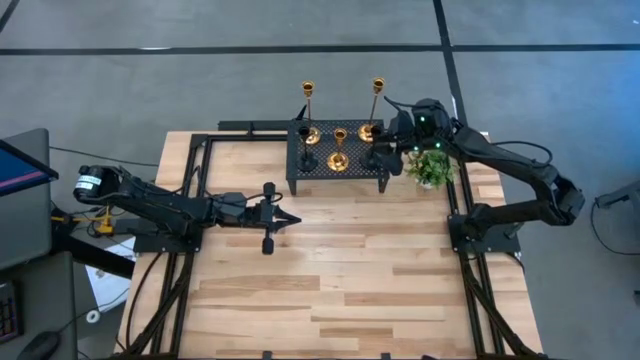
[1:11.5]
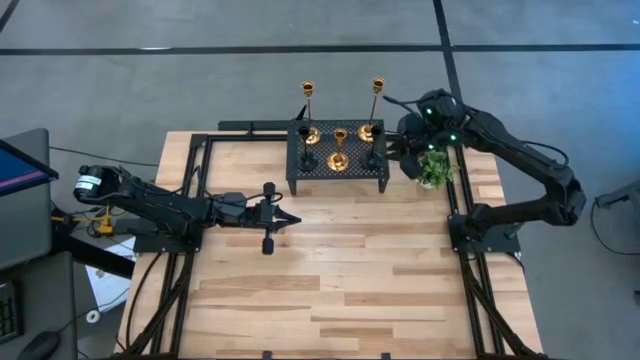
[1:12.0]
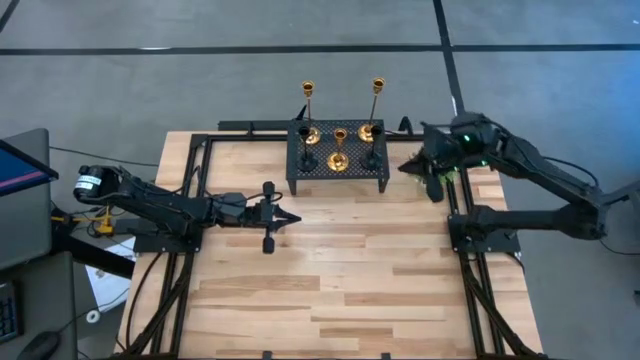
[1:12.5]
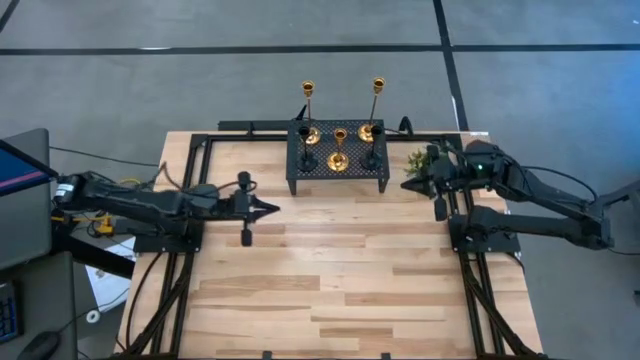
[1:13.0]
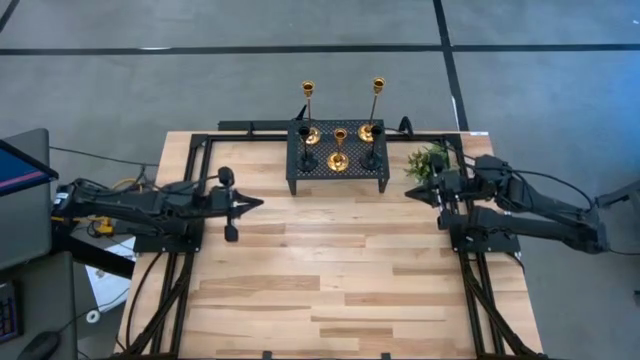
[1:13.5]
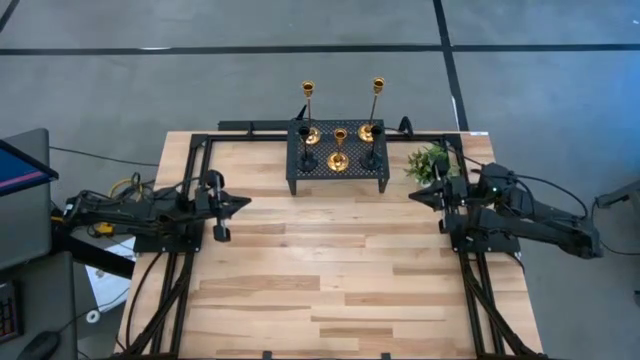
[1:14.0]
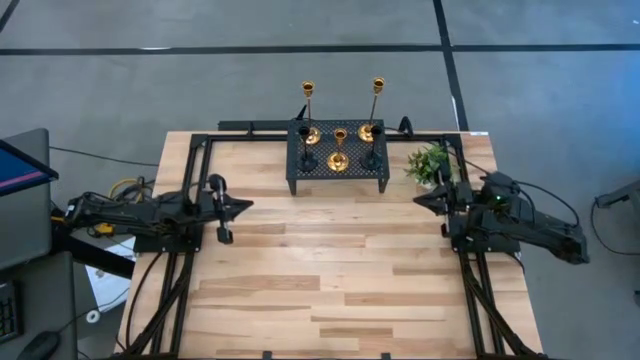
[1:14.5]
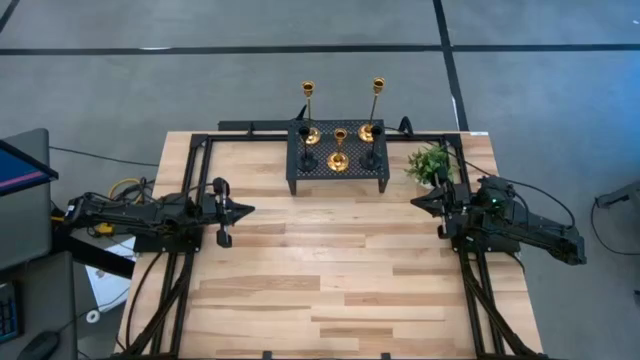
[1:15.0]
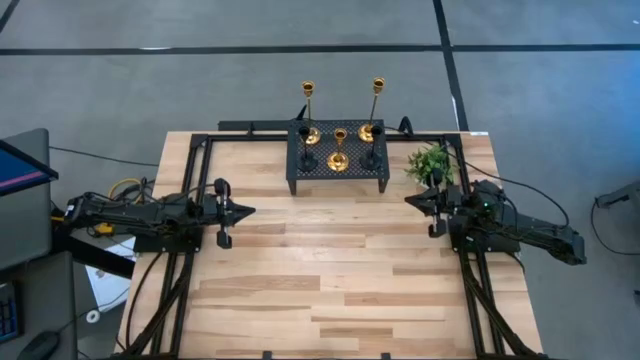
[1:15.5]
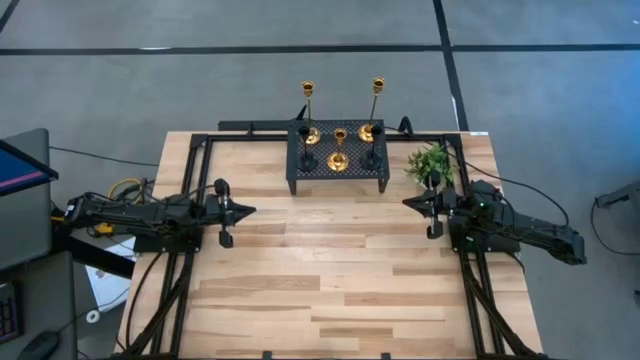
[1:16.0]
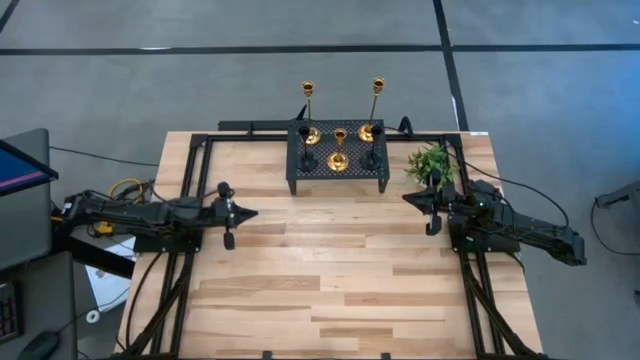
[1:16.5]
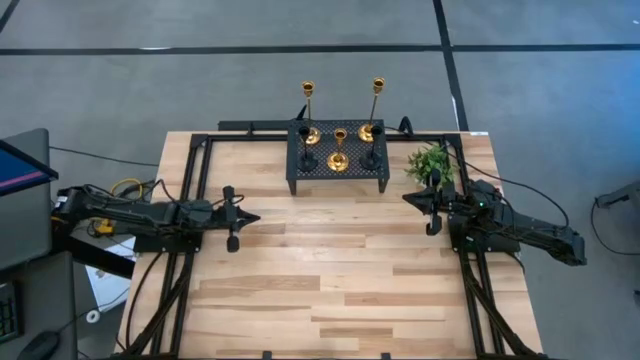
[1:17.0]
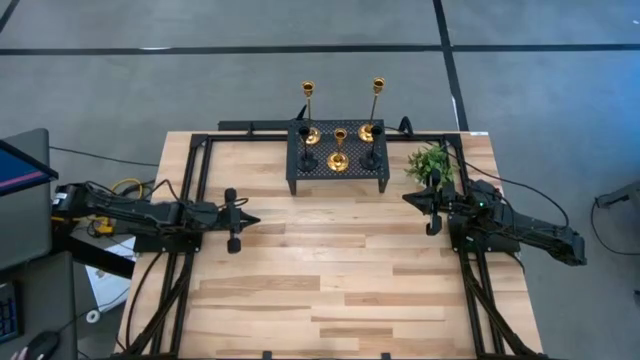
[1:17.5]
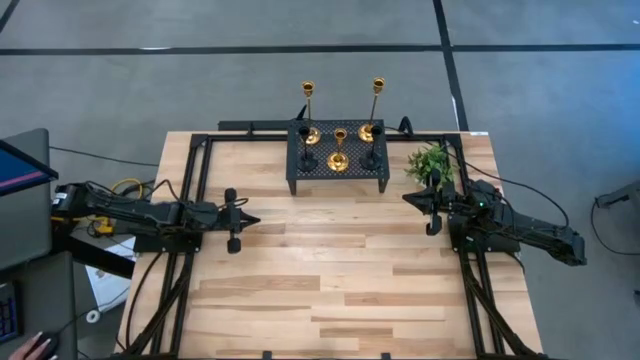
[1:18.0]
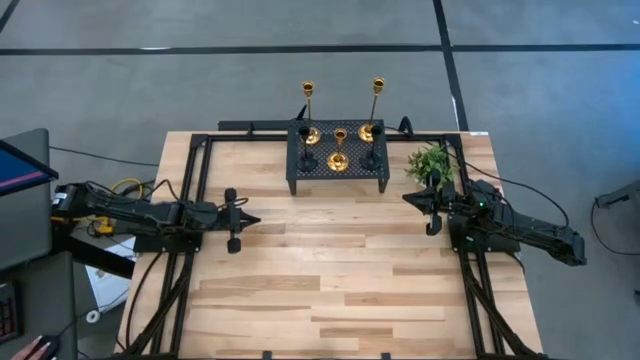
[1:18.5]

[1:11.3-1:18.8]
Task: Pick & Place candle stick holders
Return to Home Position

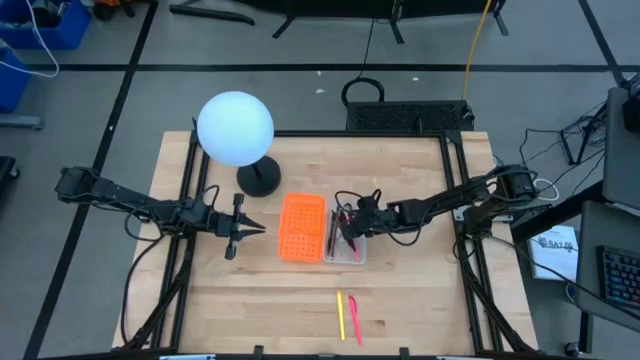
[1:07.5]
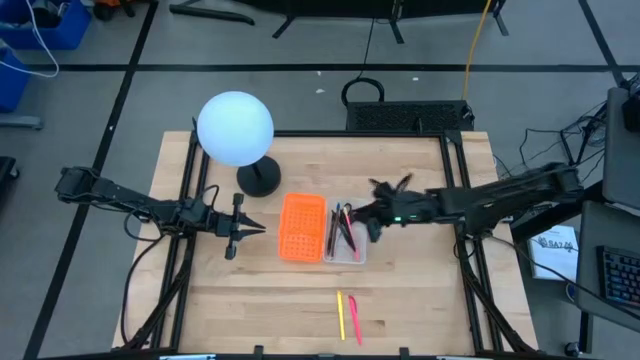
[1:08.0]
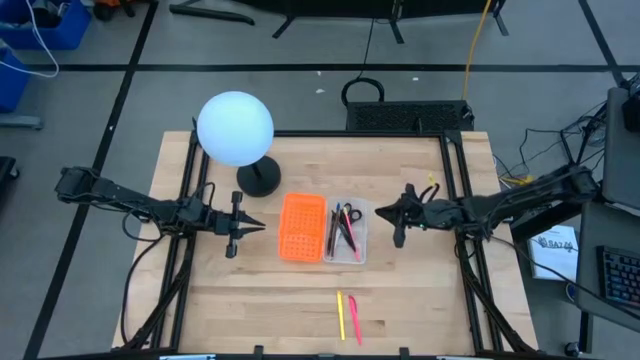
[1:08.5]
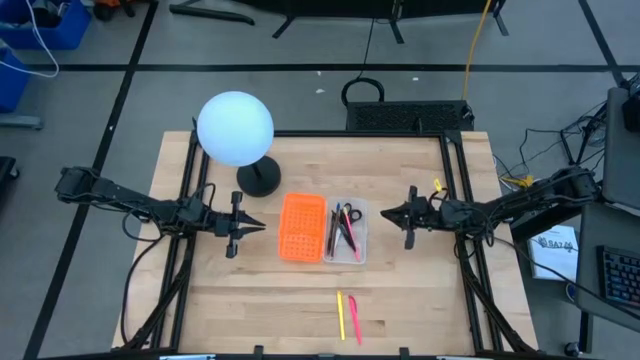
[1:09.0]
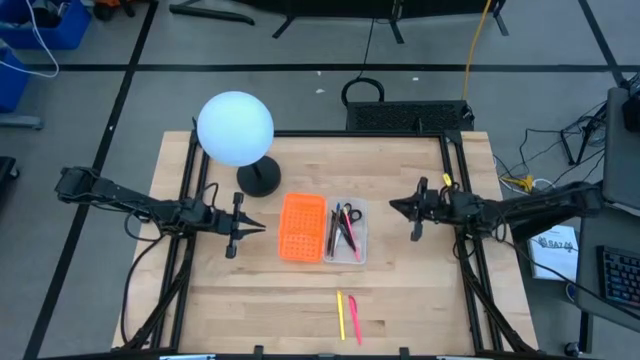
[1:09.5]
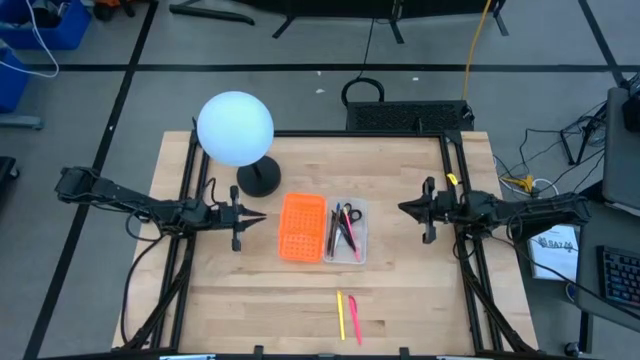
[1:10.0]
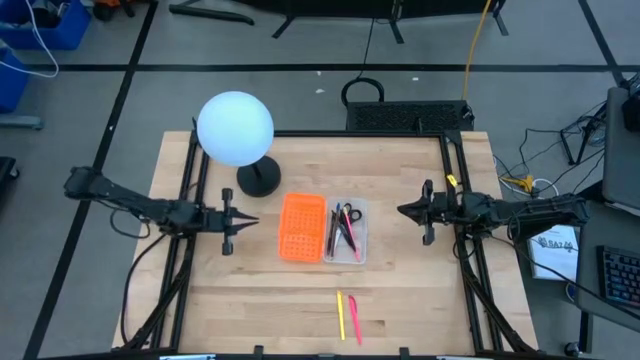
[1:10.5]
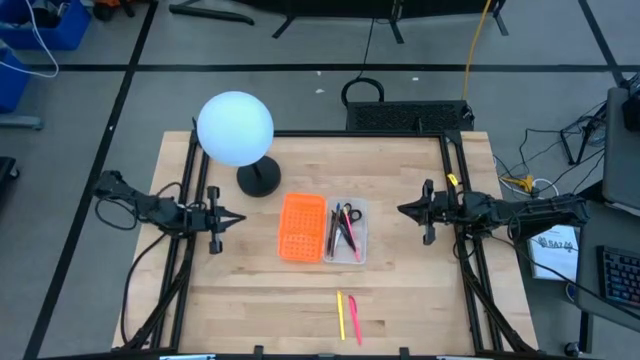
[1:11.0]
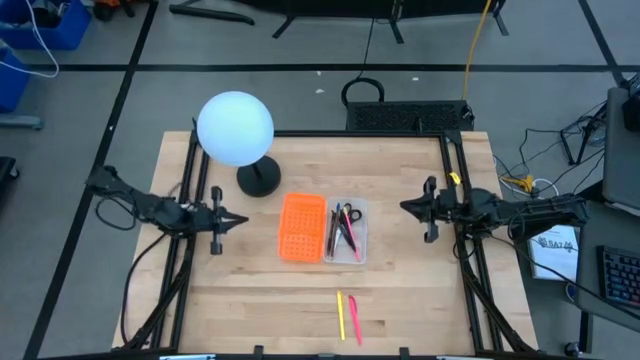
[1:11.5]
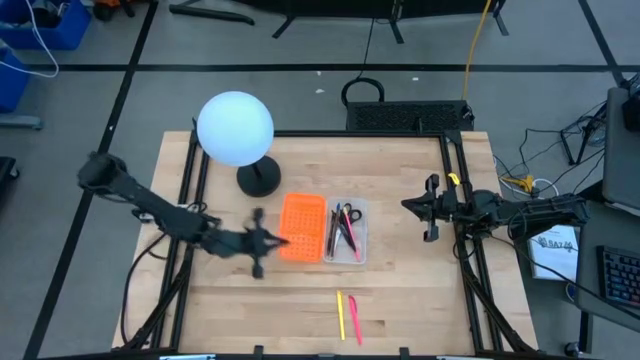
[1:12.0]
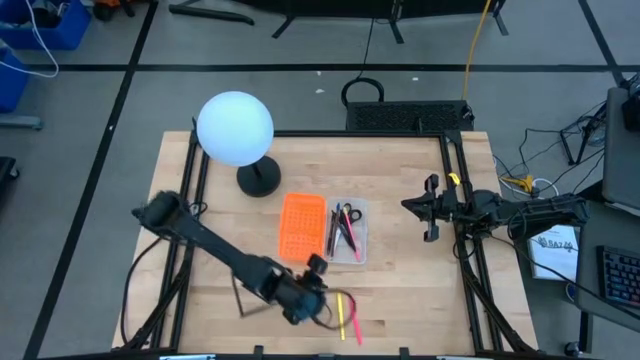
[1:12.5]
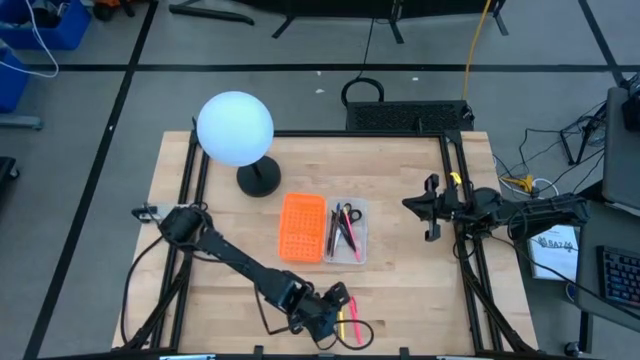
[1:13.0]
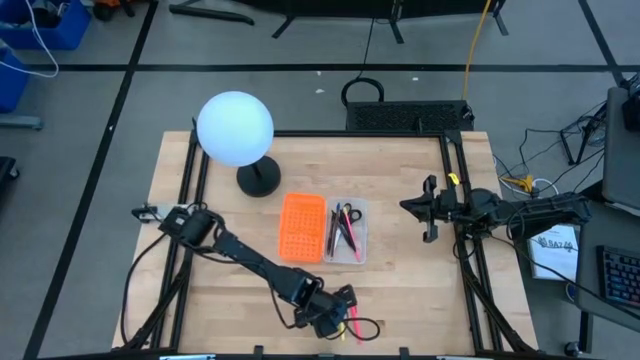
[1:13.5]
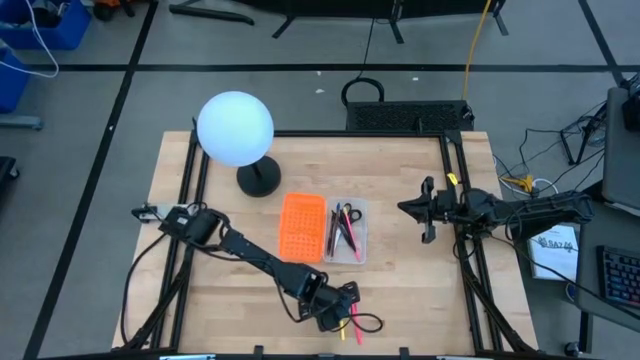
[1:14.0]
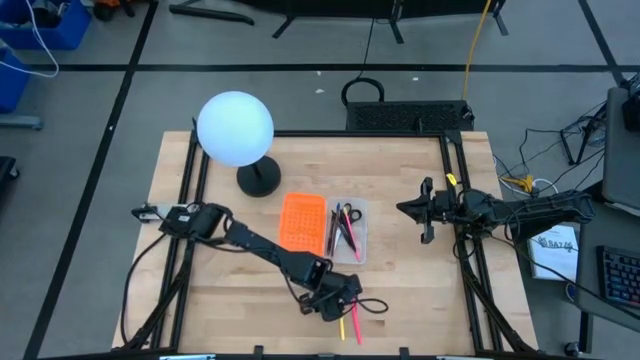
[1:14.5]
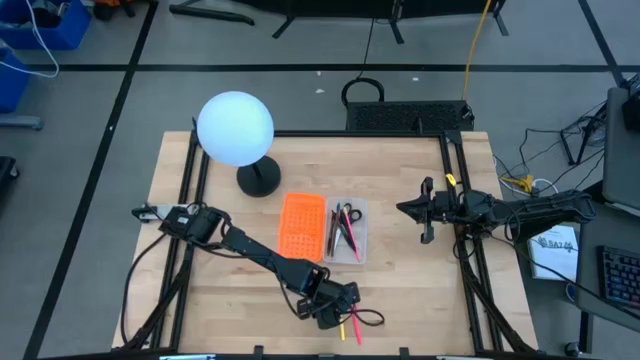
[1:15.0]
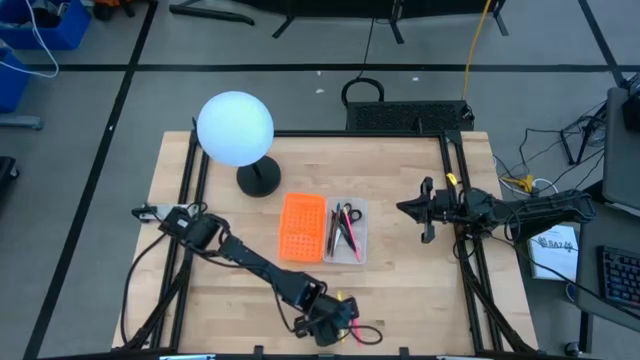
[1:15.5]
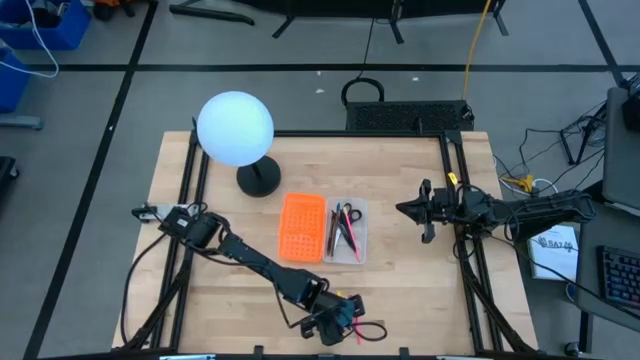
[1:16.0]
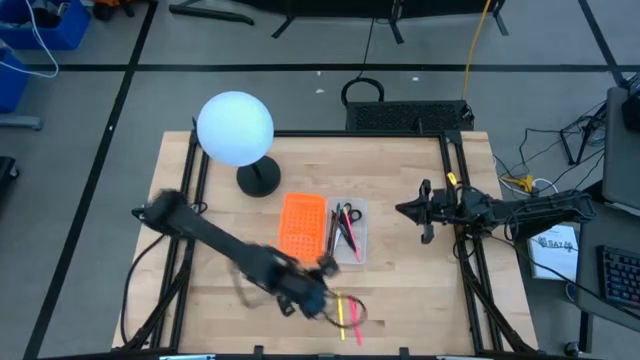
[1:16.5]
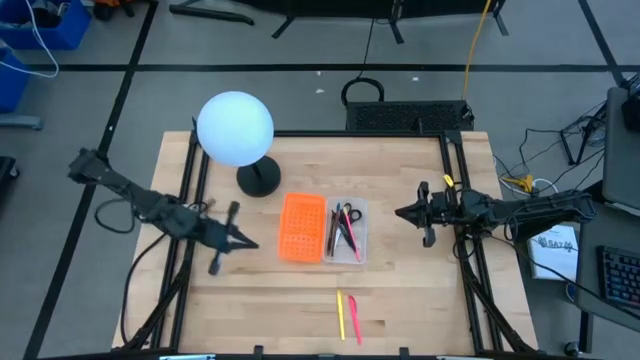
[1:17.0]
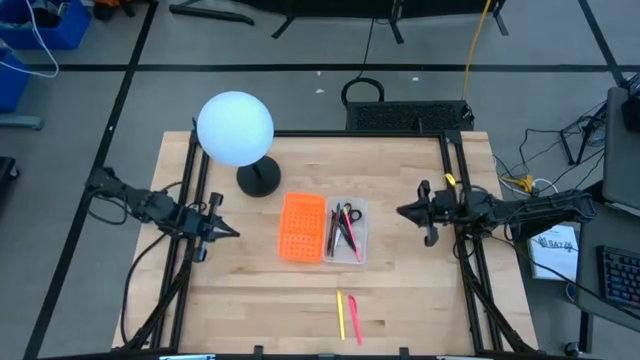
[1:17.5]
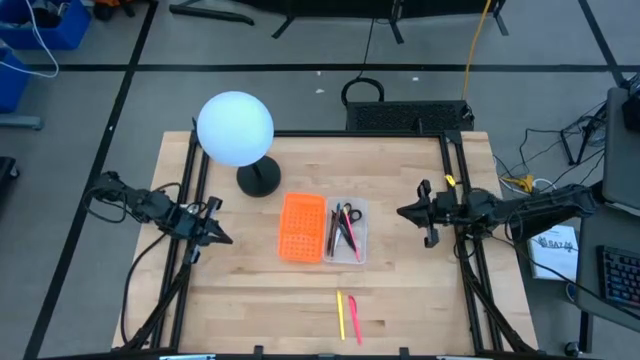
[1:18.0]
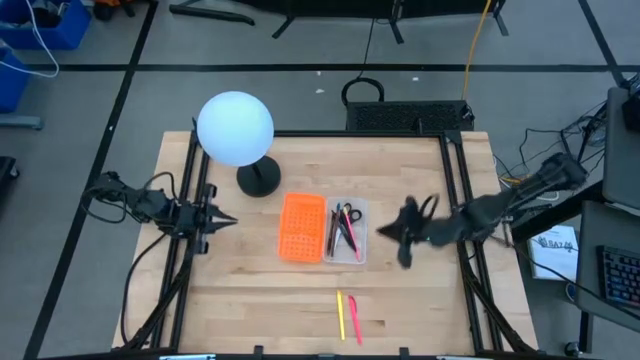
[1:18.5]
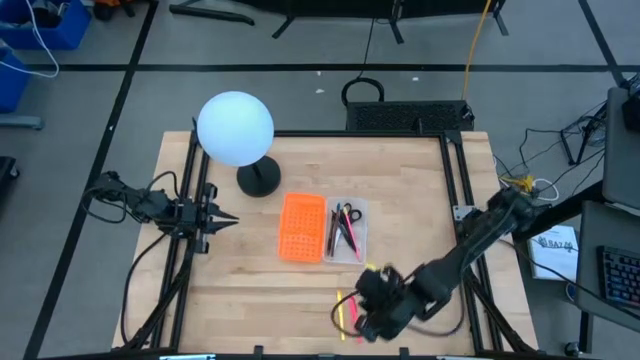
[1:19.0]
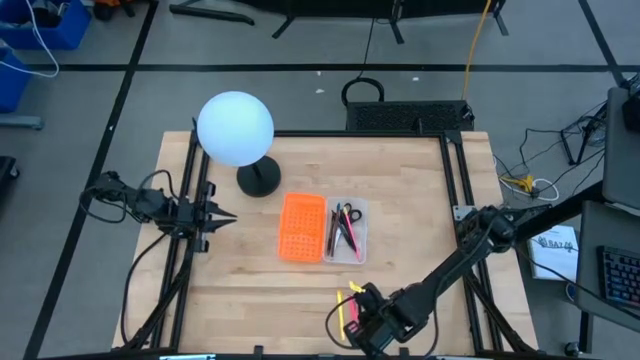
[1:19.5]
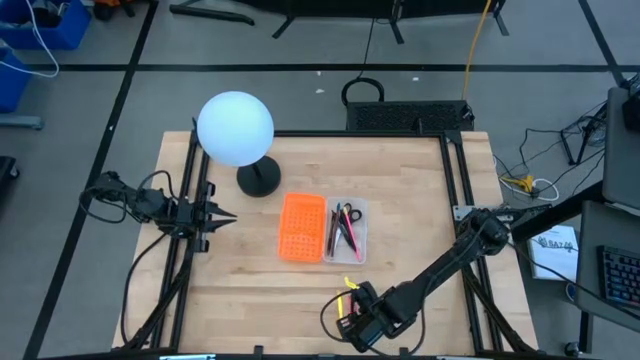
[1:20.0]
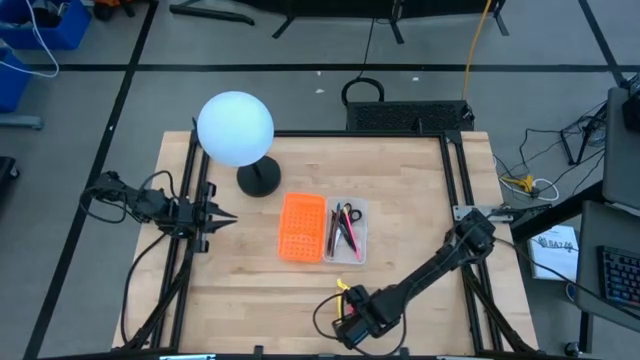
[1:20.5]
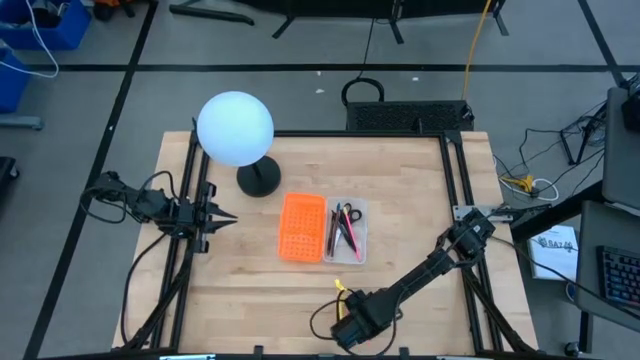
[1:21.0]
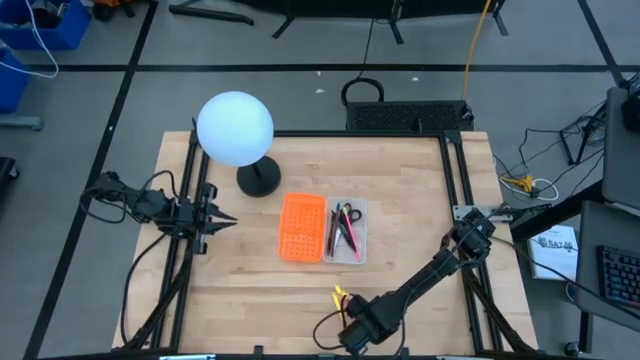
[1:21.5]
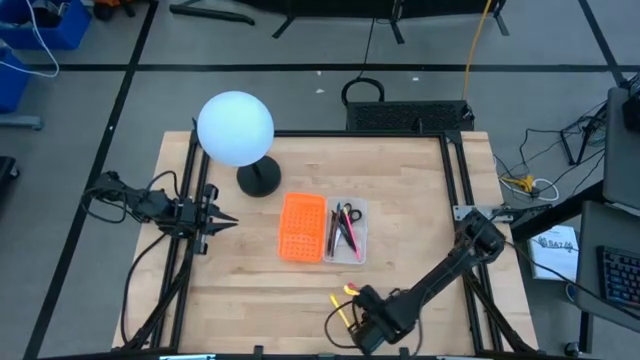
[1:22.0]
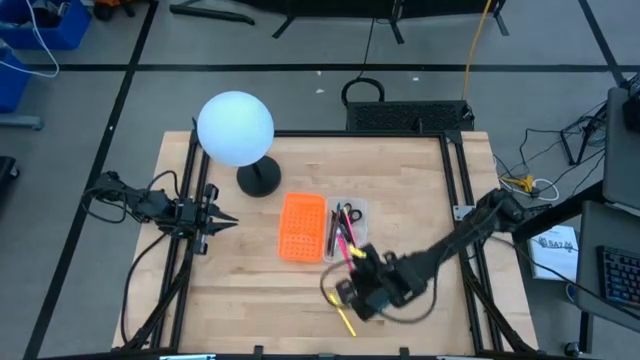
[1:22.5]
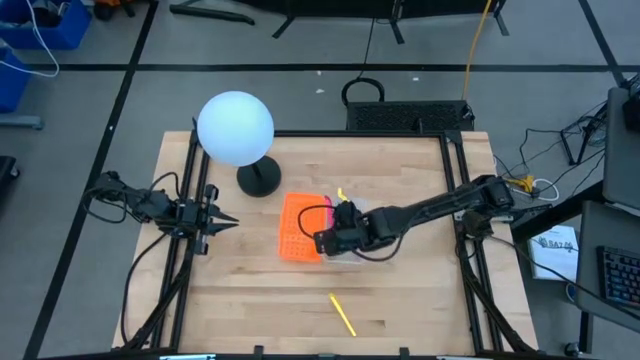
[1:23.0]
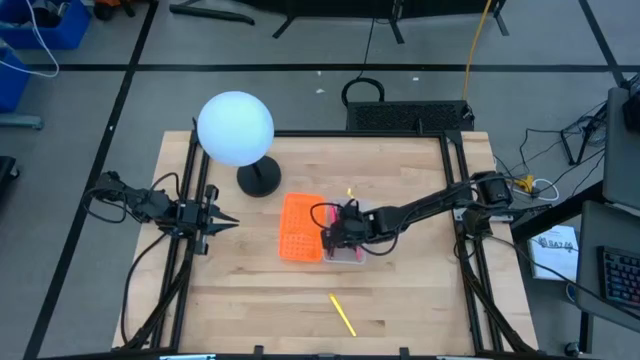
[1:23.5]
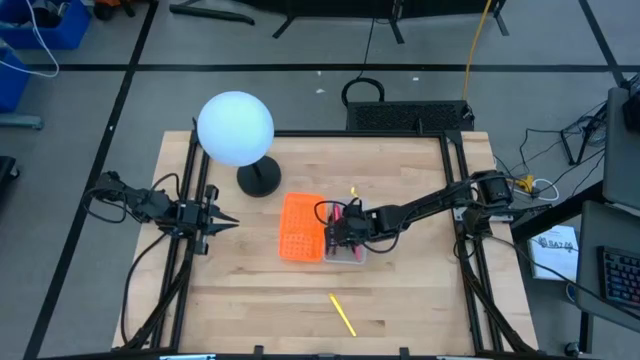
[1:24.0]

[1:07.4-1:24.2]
Task: Pick & place school supplies into a supply box
Put the pink pen into the orange supply box
